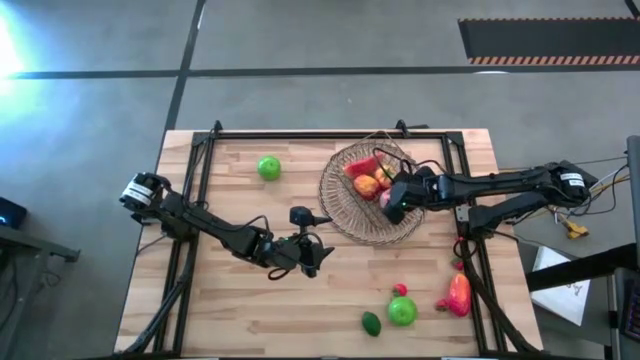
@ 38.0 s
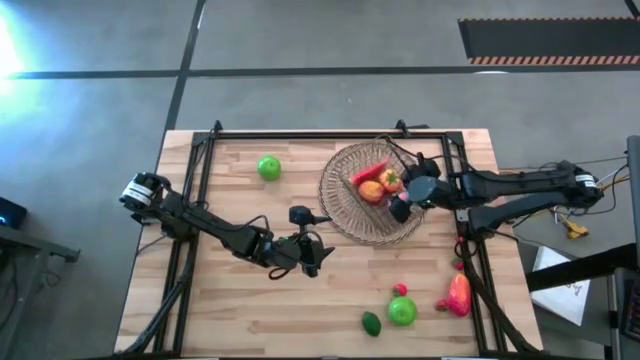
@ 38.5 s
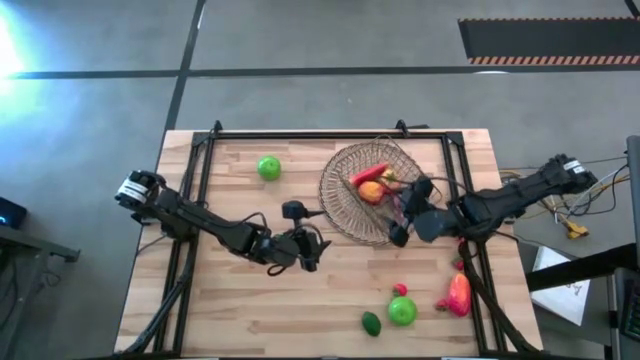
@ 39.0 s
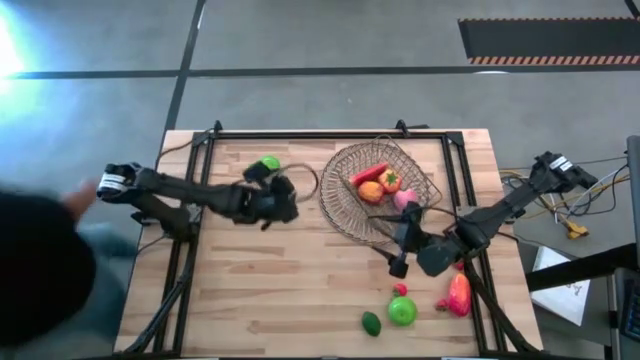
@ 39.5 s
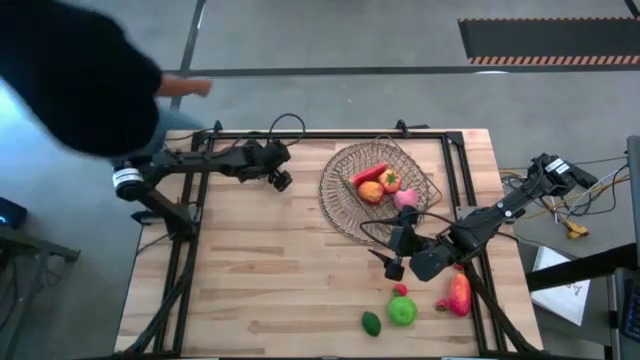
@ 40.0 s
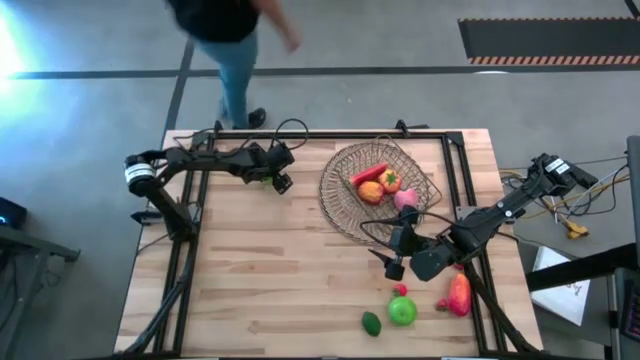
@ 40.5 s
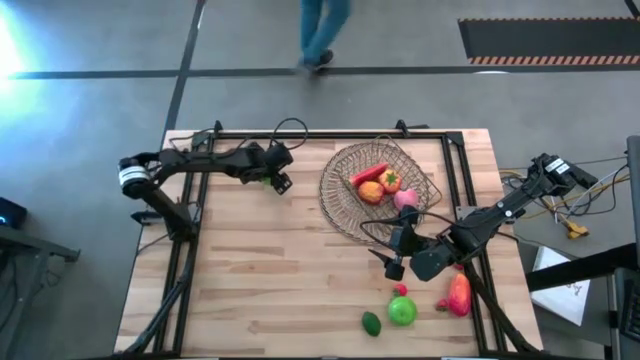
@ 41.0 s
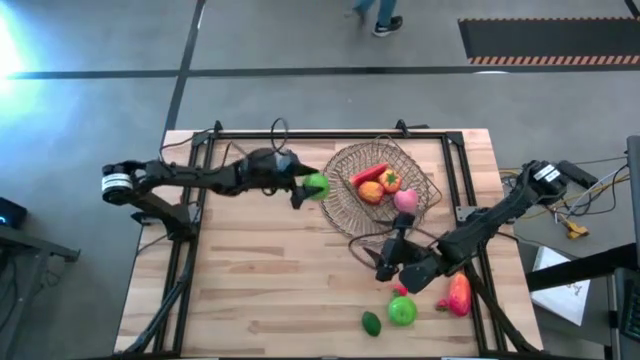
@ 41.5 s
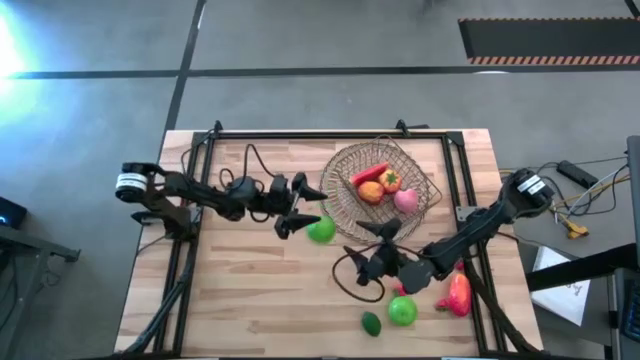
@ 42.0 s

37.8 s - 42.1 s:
Task: Build produce basket
Put the top green apple into the gold mesh basket

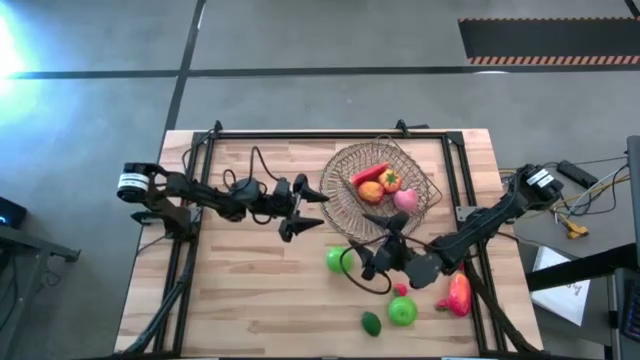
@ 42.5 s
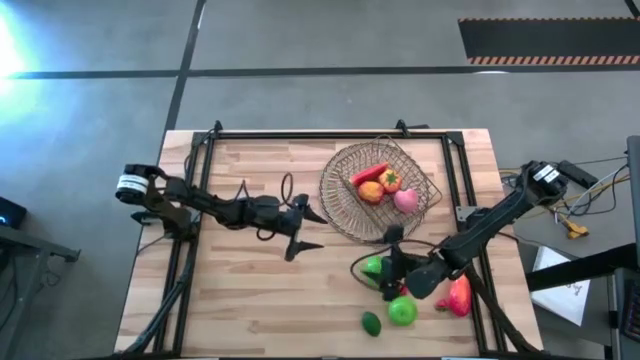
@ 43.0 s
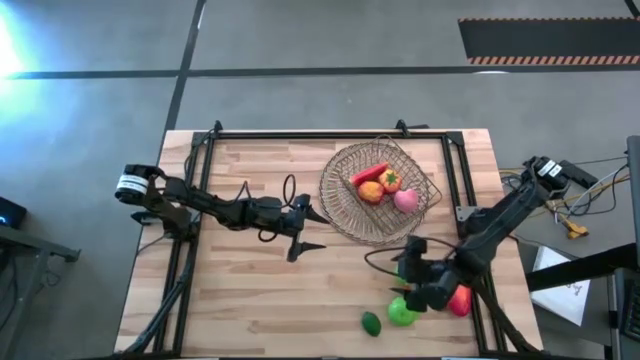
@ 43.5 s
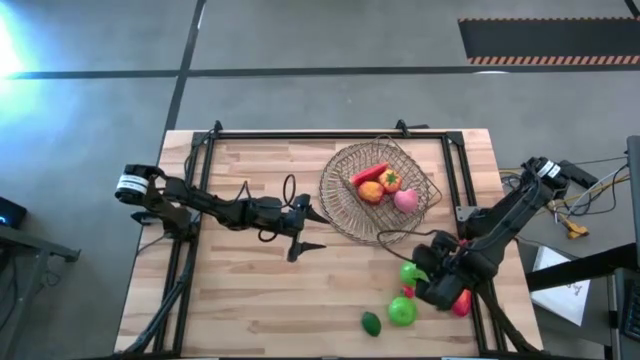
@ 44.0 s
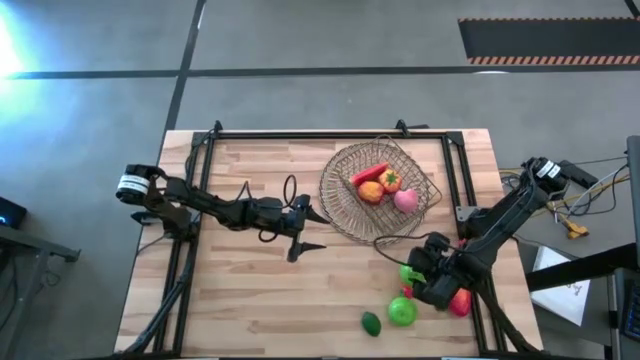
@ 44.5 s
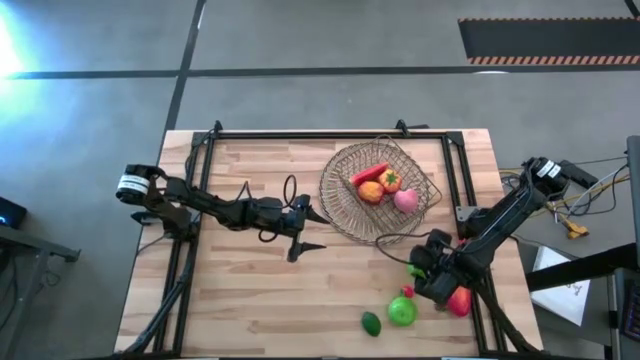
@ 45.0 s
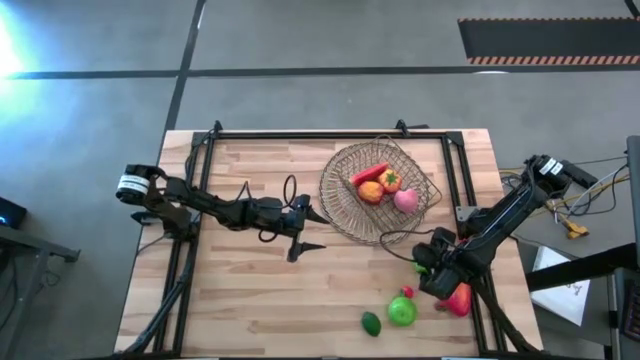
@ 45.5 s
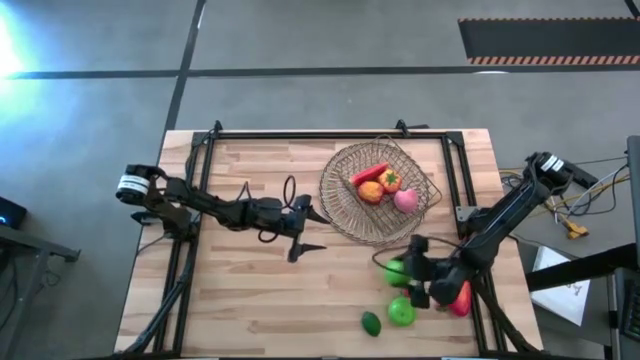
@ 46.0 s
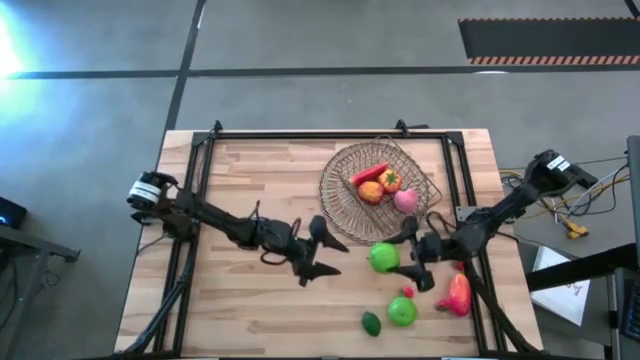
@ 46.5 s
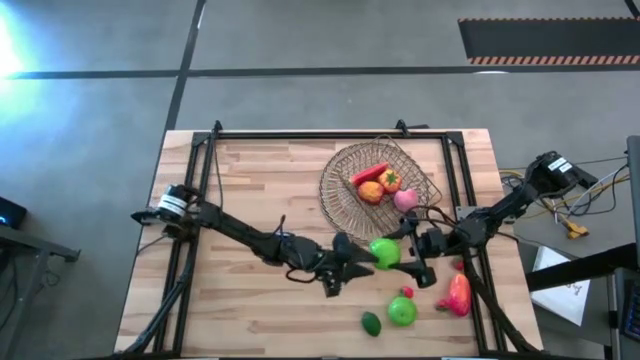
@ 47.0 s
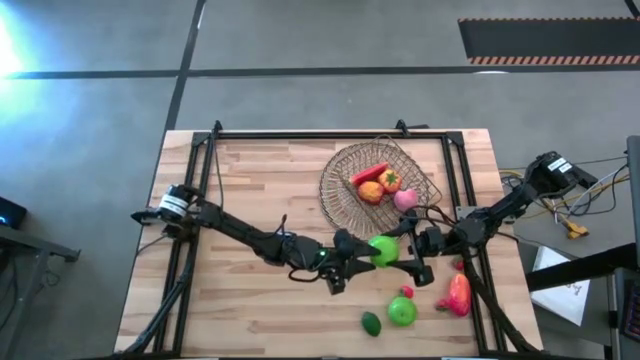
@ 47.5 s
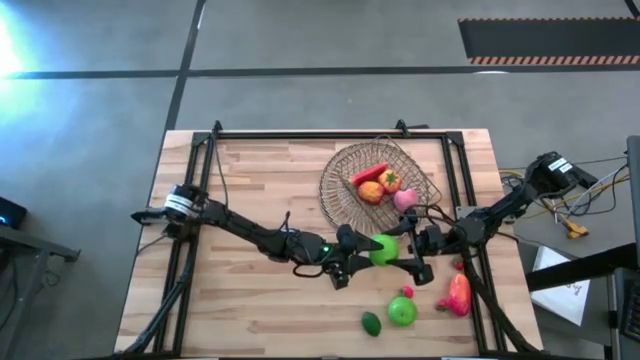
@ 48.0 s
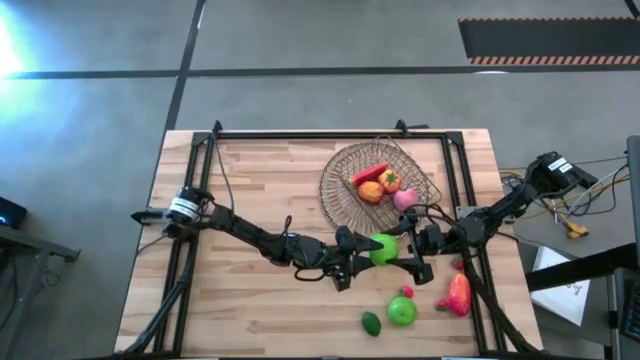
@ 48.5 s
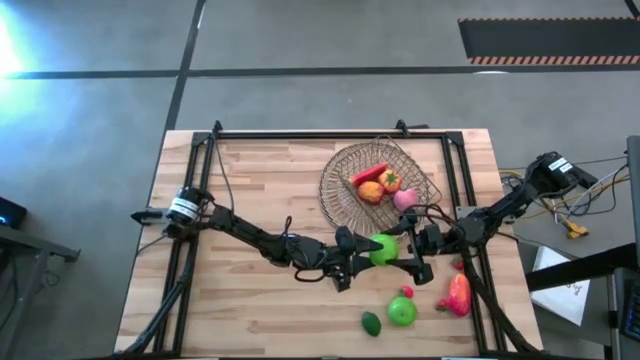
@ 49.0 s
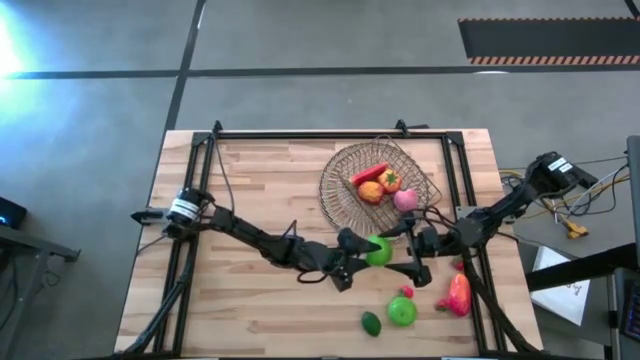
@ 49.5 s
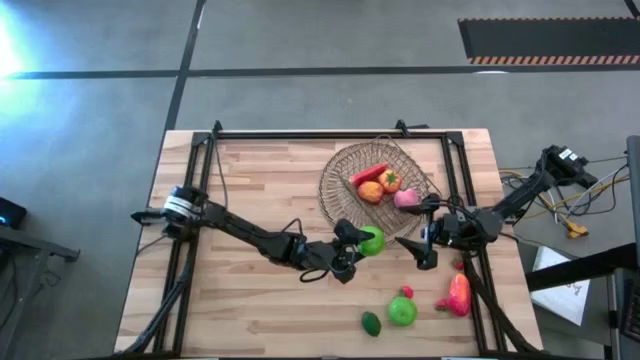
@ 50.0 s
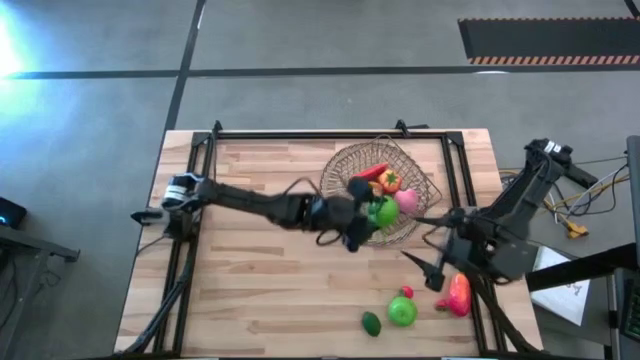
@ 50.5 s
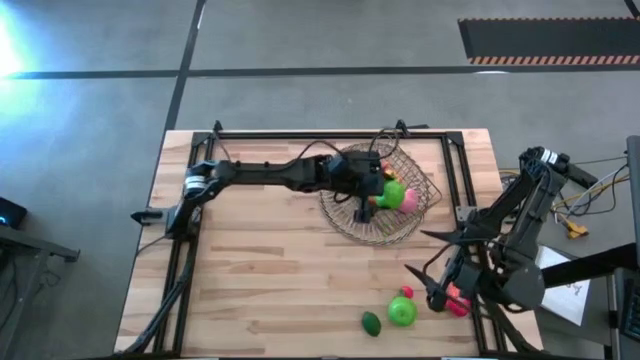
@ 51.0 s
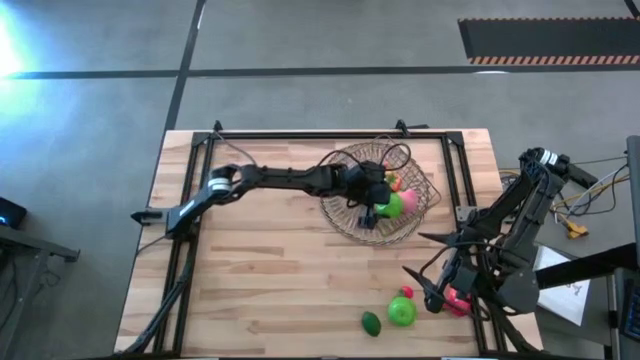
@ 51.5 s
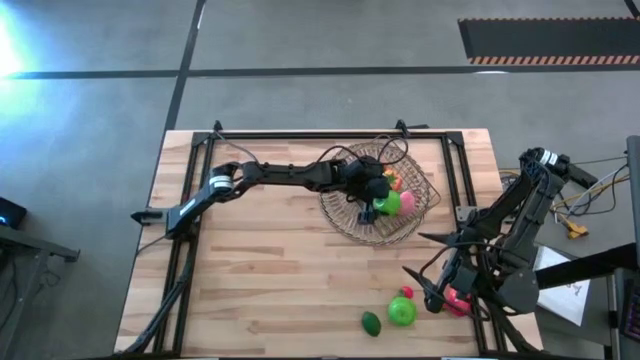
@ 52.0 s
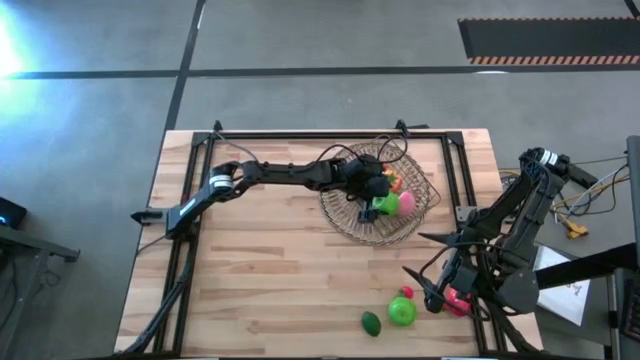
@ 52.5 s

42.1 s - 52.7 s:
Put the top green apple into the gold mesh basket

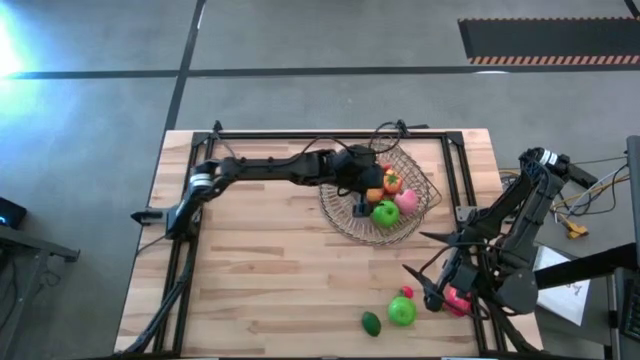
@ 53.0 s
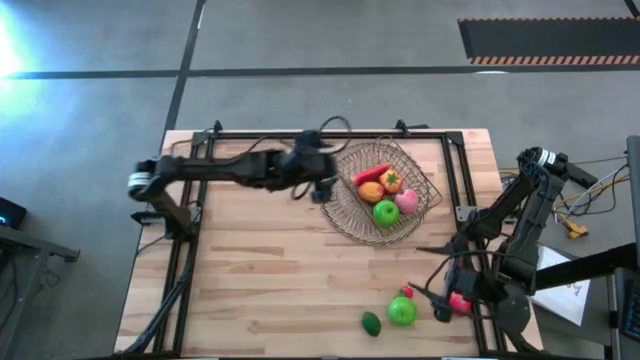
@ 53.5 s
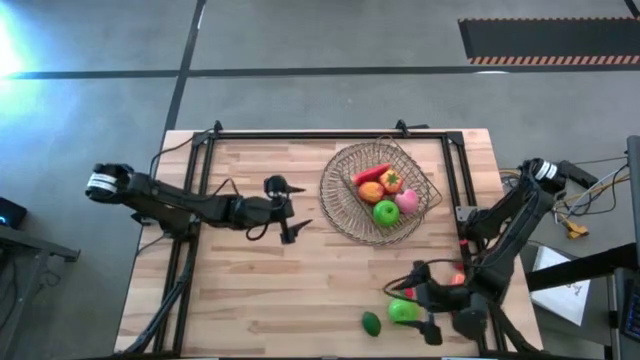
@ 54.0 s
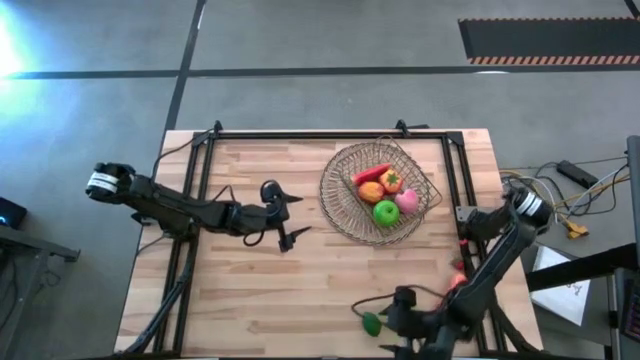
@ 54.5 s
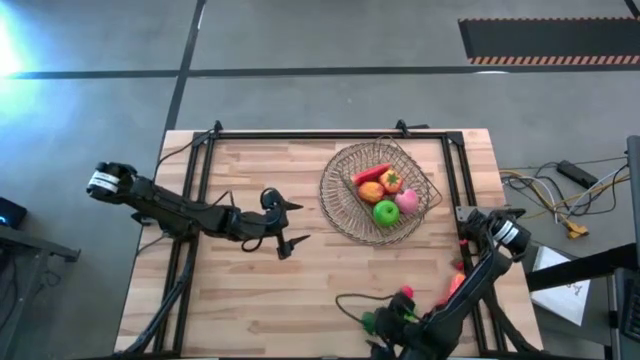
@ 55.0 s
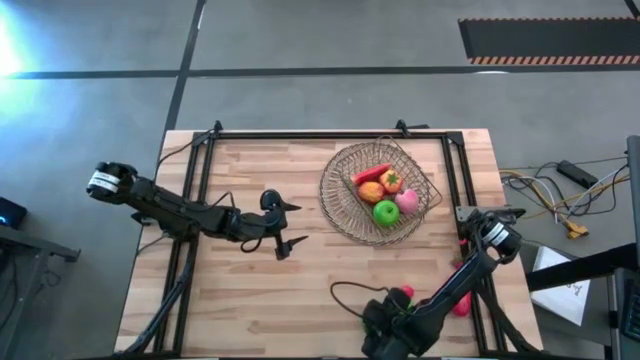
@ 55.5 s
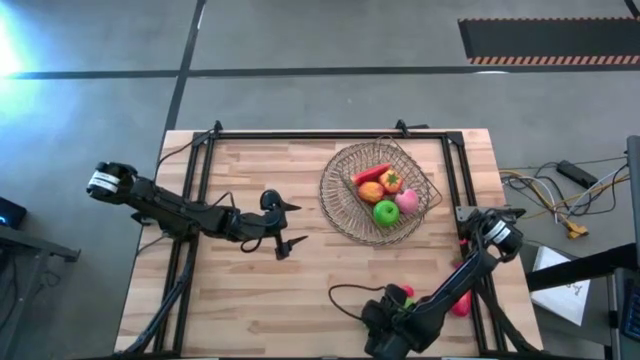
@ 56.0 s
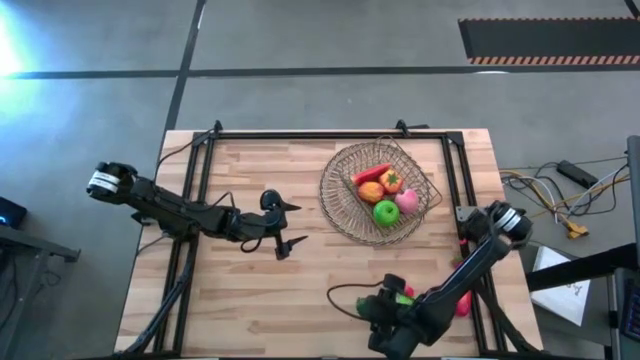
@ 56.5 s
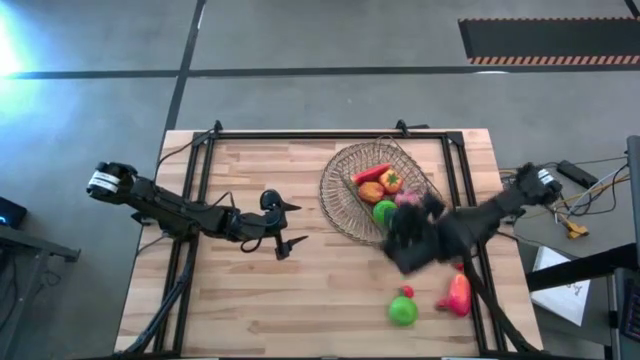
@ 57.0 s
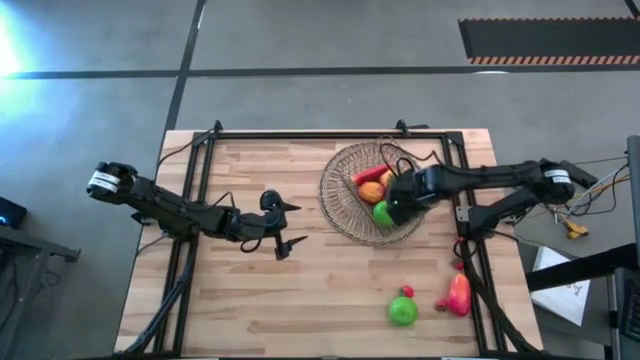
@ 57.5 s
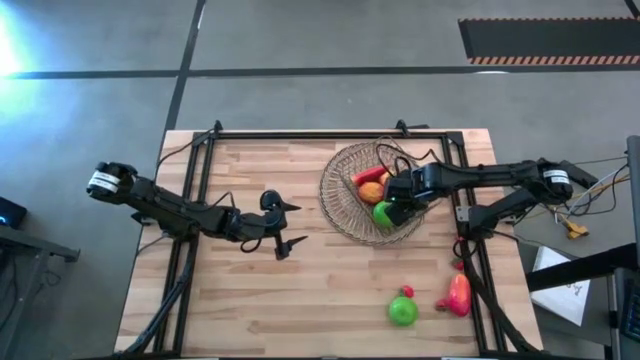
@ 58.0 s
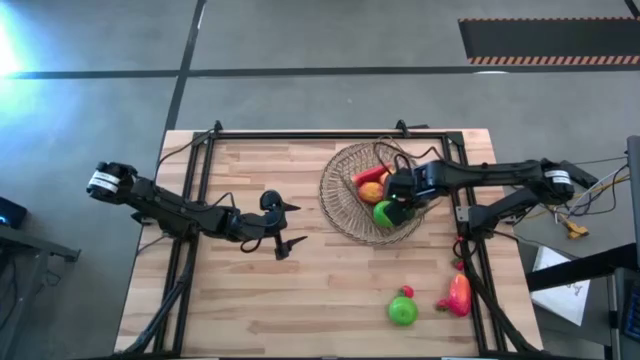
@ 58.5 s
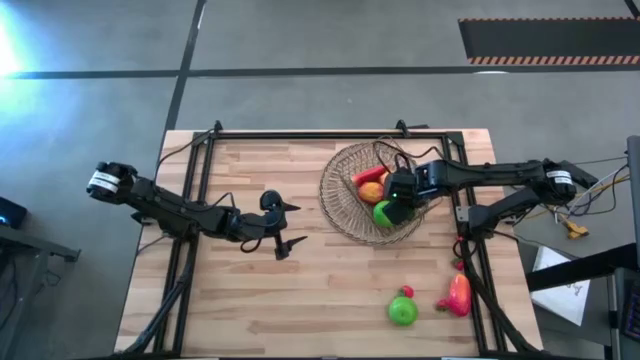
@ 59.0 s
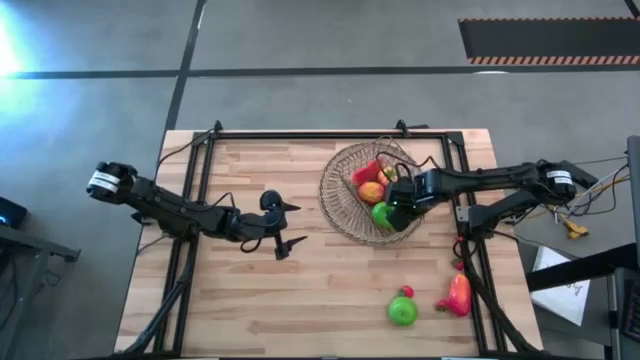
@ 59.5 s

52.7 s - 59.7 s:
Put the green lime into the gold mesh basket
